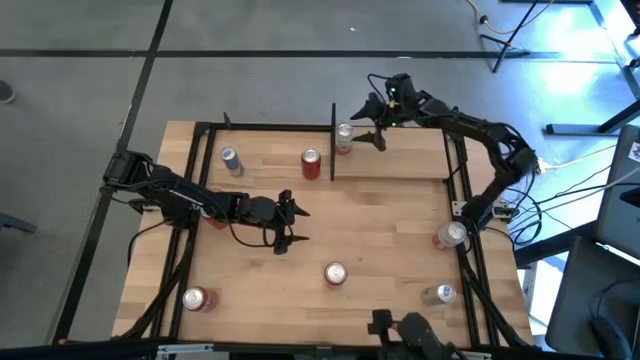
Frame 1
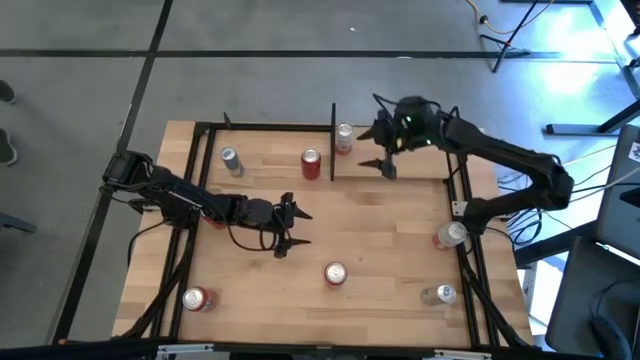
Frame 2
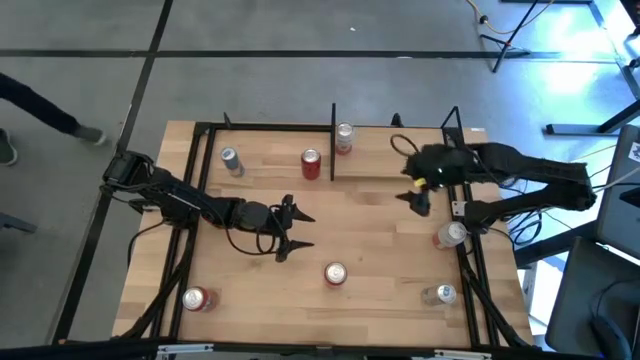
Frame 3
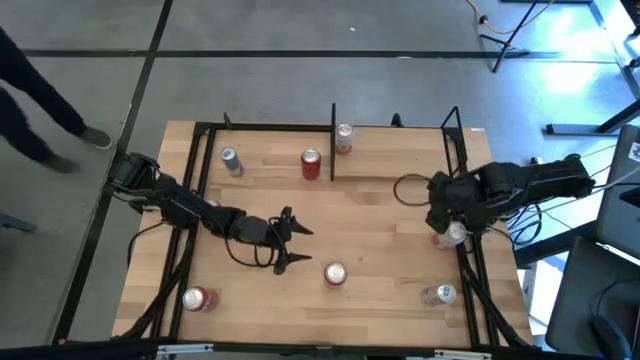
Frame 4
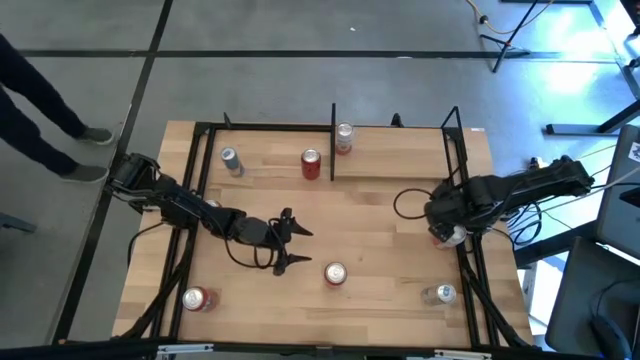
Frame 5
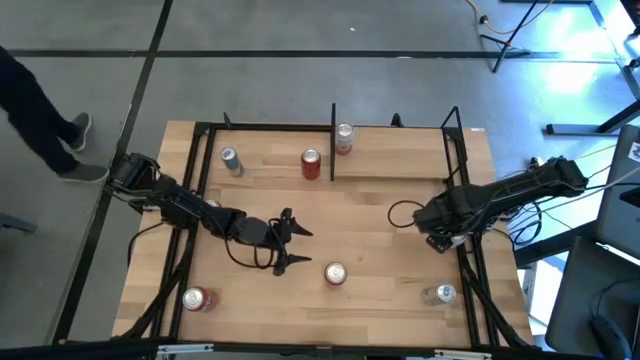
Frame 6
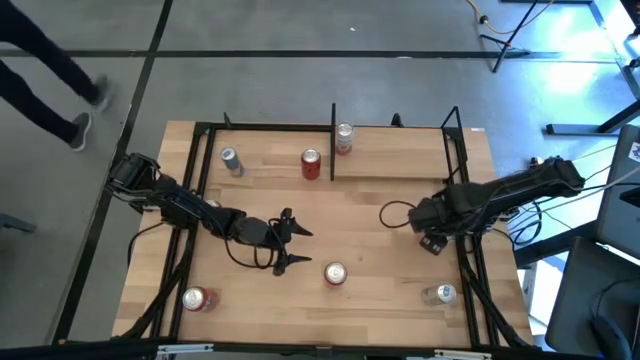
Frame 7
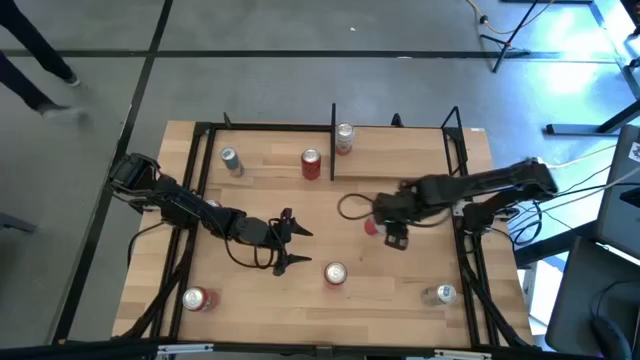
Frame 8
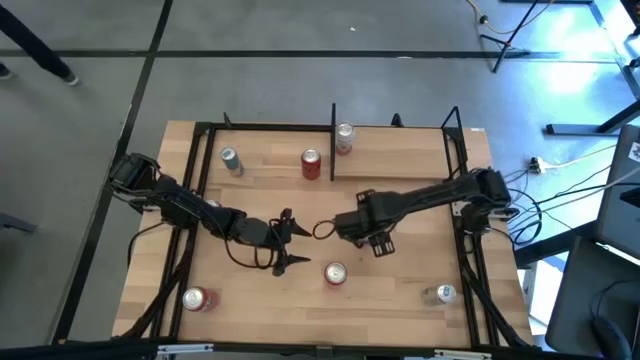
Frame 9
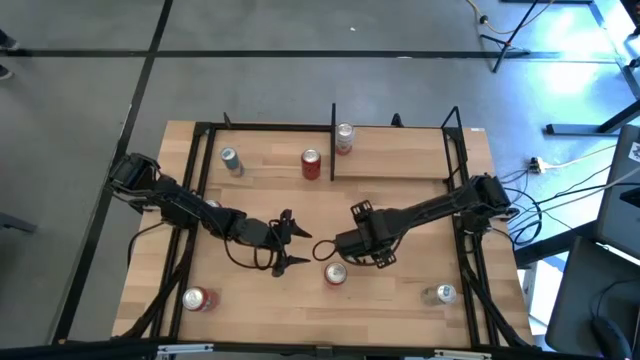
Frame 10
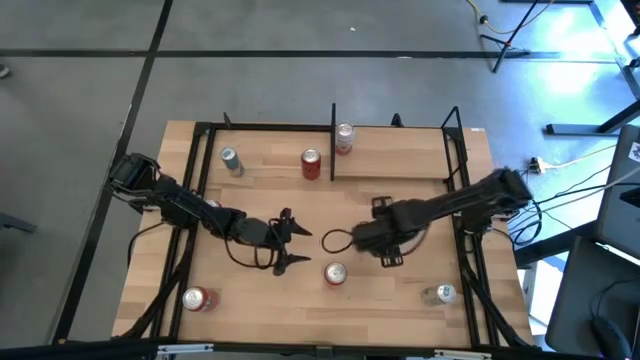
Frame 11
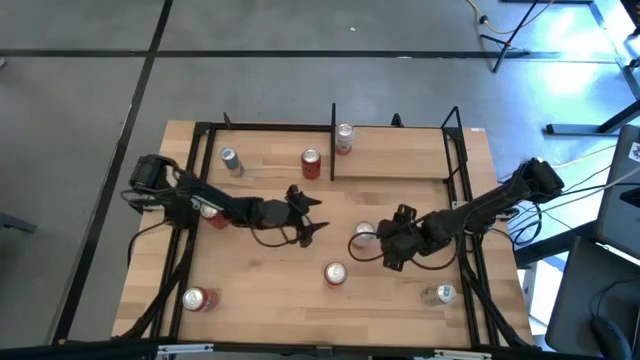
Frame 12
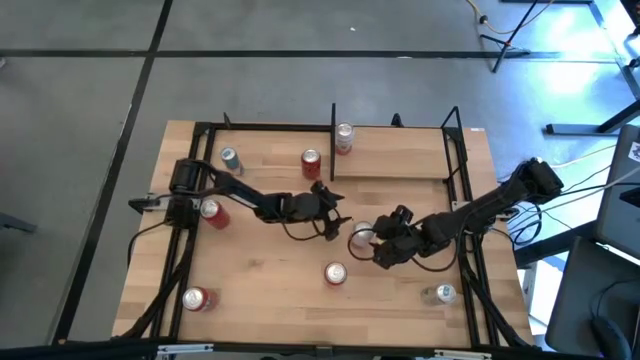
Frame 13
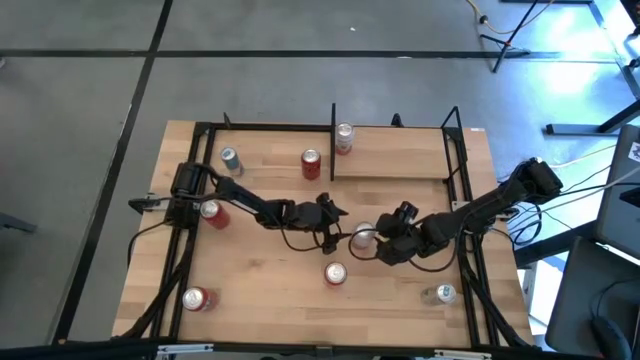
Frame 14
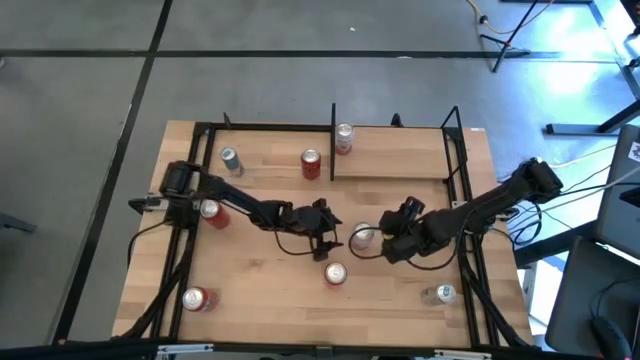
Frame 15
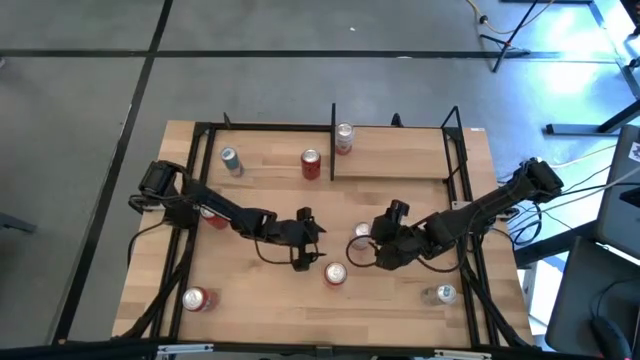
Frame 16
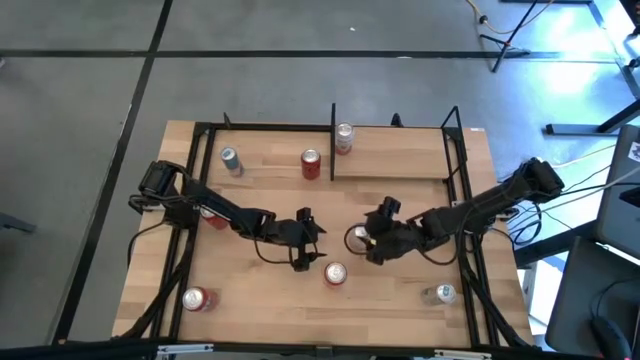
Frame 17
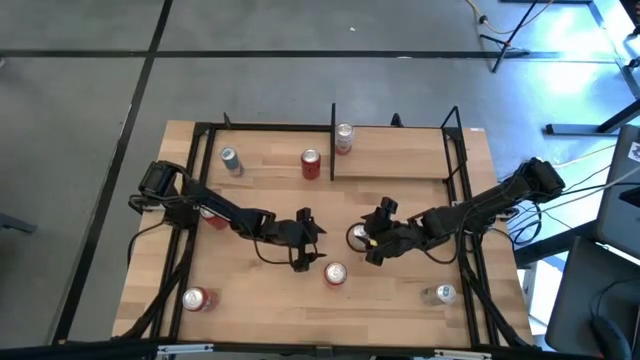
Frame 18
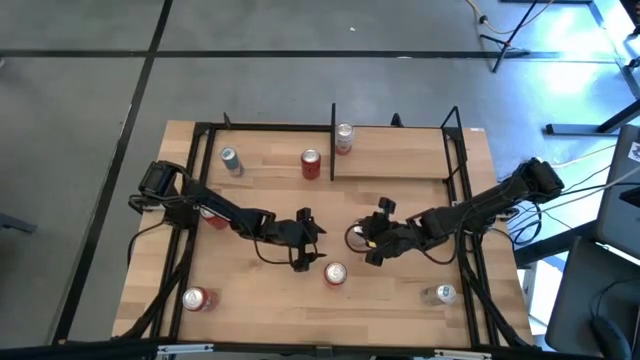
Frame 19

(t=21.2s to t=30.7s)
Task: Place canned beverage on shelf
Put the pink white soda can on the shelf aligned with the other pink white soda can

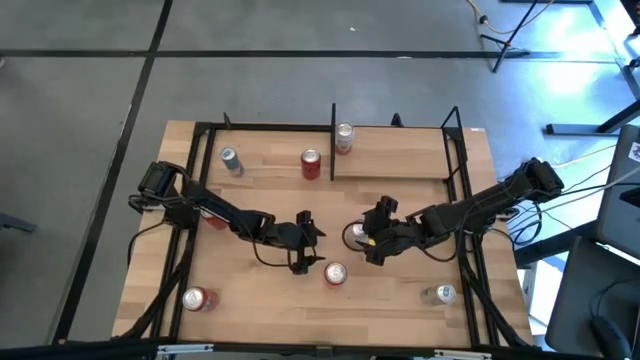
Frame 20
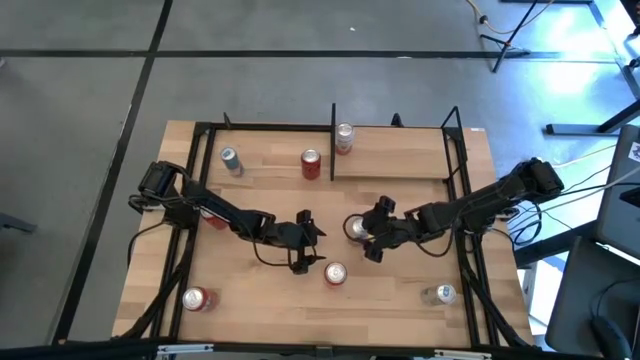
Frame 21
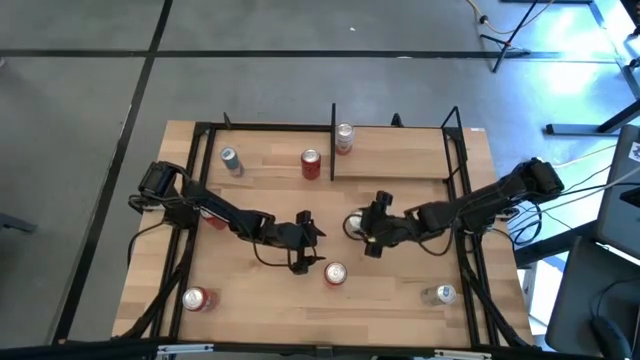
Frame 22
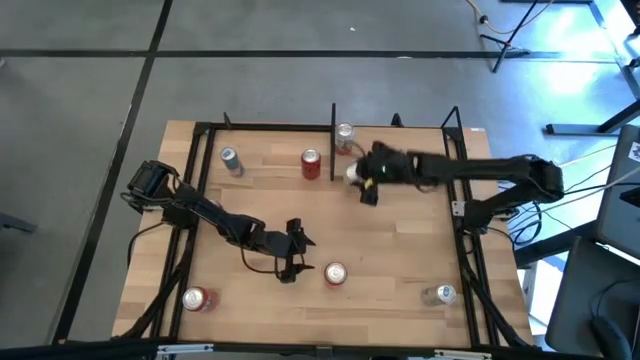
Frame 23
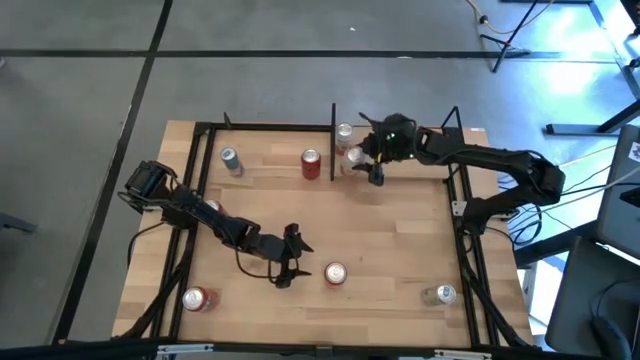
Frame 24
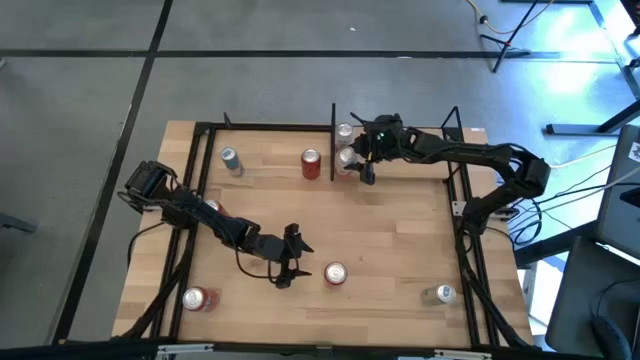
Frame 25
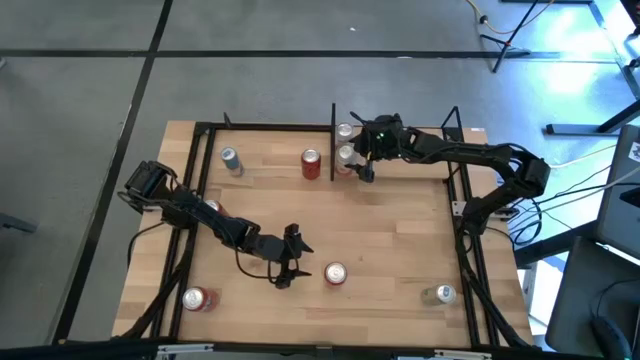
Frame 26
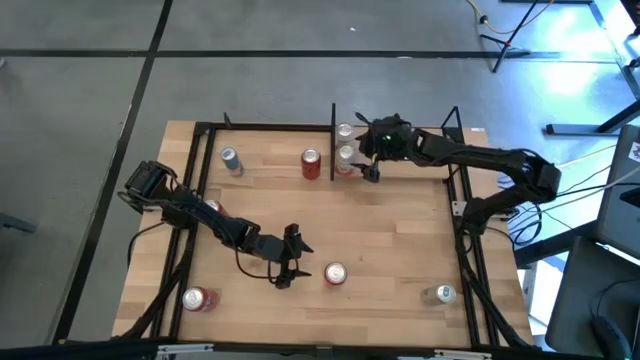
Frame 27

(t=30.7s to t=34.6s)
Put the pink white soda can on the shelf aligned with the other pink white soda can

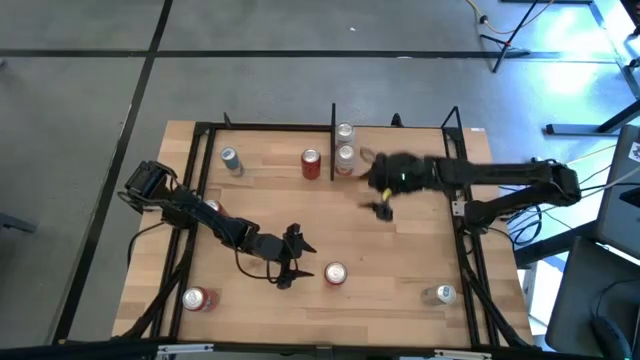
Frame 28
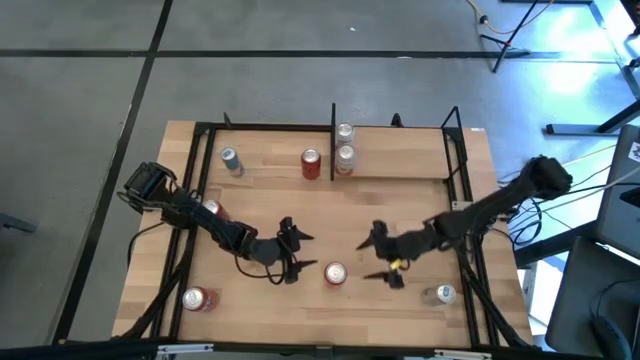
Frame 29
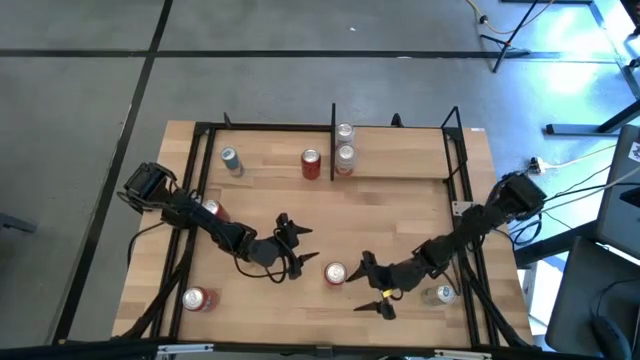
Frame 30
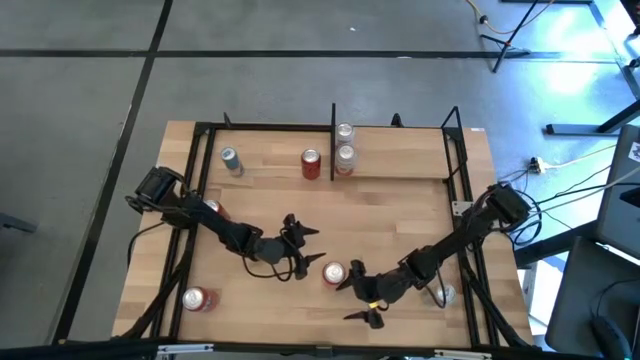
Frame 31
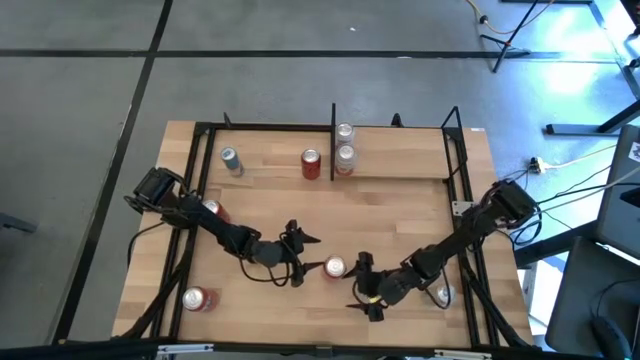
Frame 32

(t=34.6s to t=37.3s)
Put the right orange soda can on the shelf

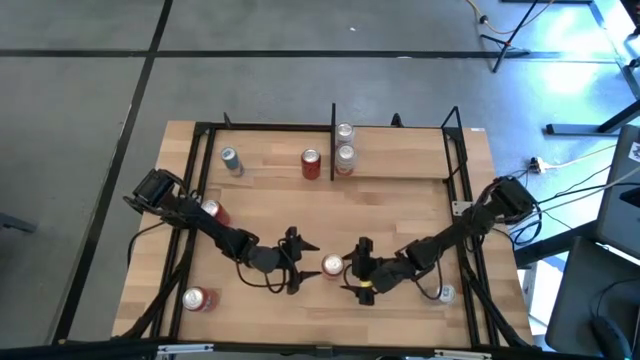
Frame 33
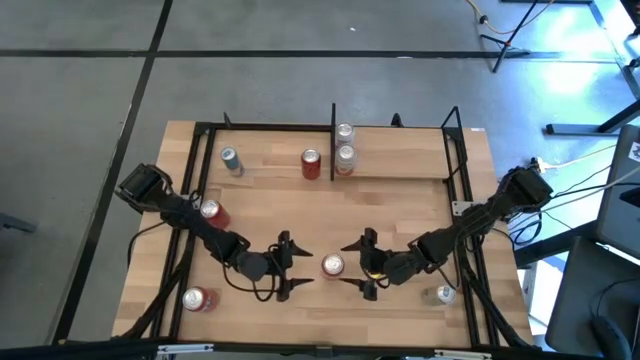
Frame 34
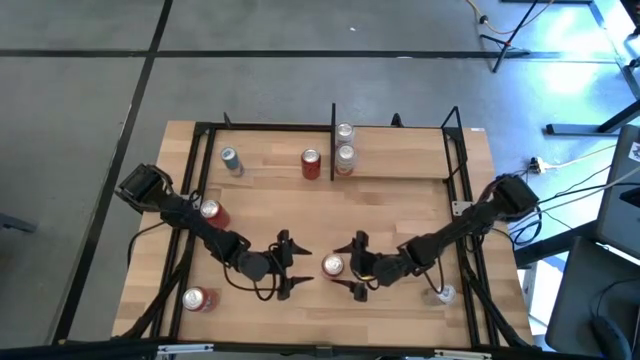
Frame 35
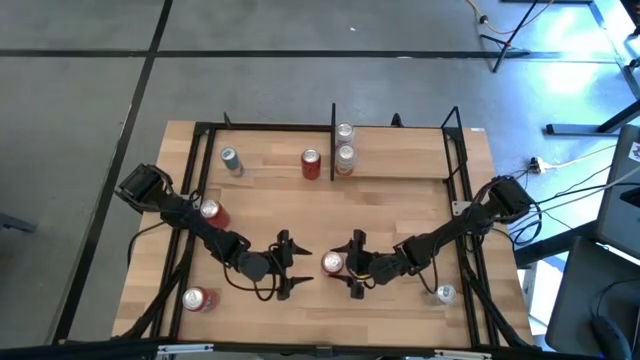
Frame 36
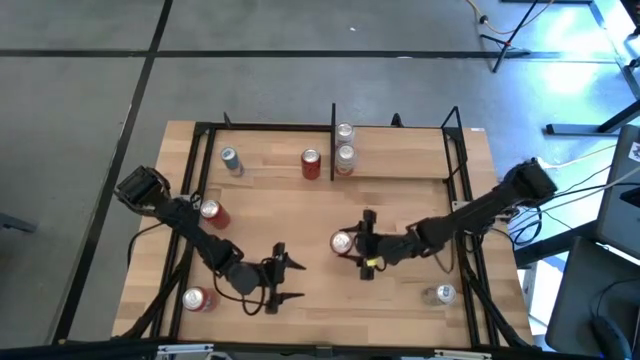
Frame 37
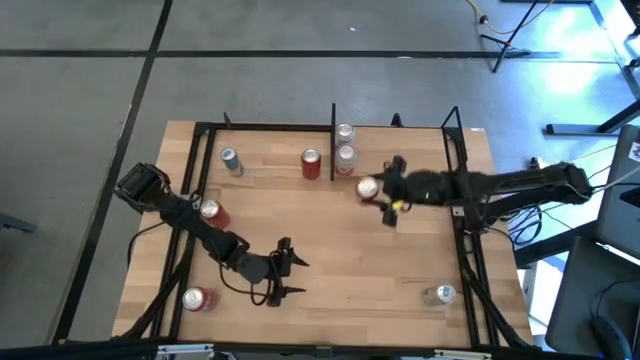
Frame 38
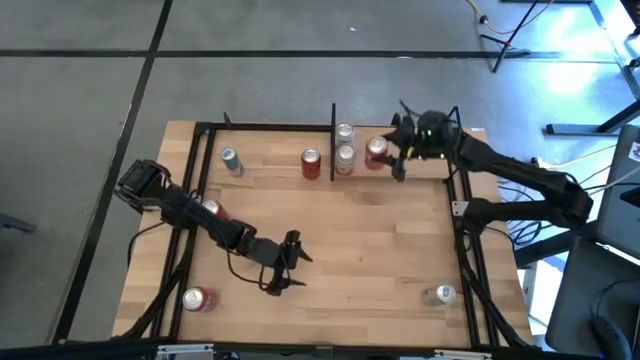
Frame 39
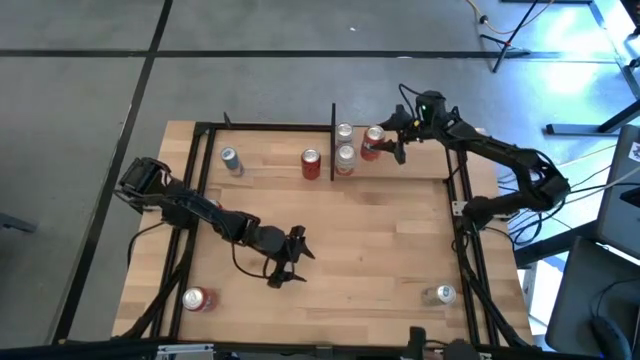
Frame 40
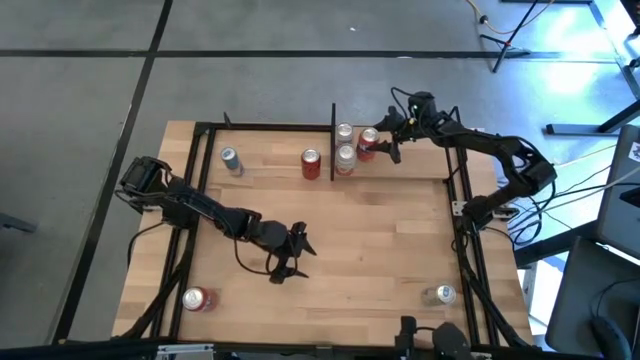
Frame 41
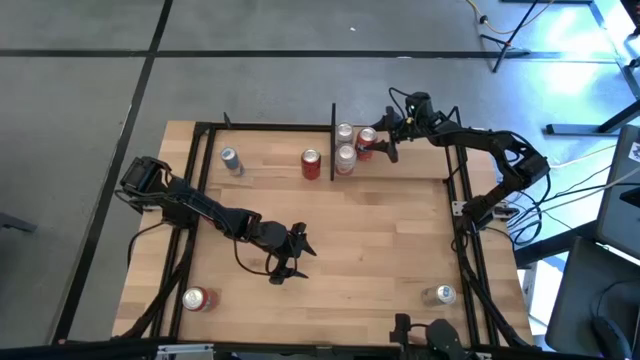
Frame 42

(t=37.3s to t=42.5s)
Put the right red soda can on the shelf
